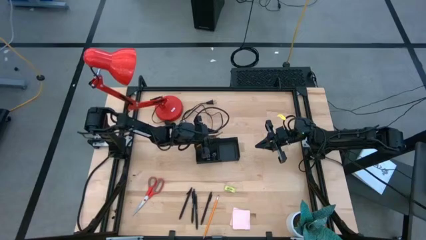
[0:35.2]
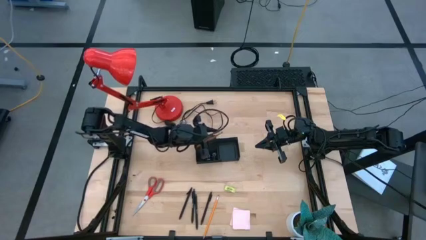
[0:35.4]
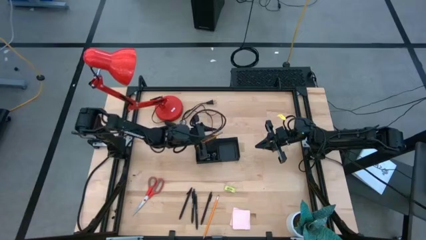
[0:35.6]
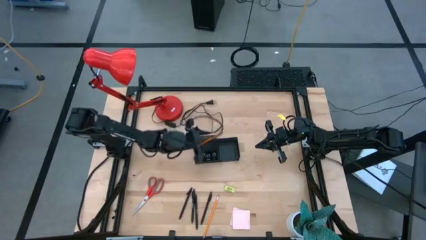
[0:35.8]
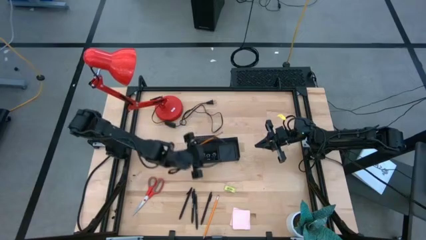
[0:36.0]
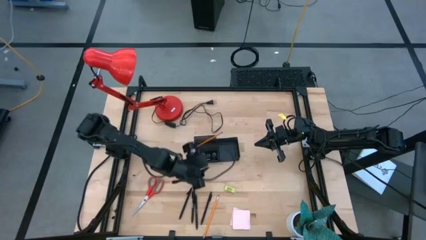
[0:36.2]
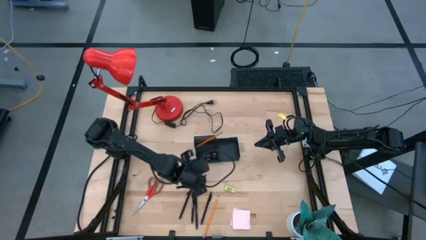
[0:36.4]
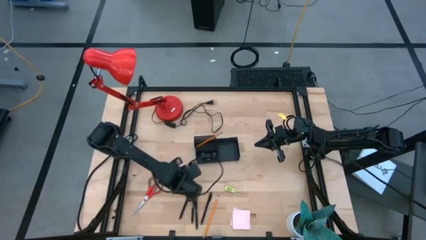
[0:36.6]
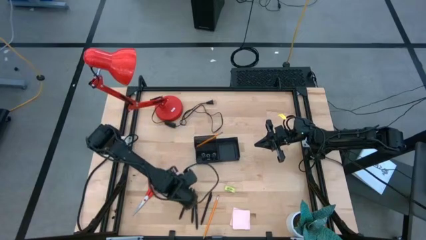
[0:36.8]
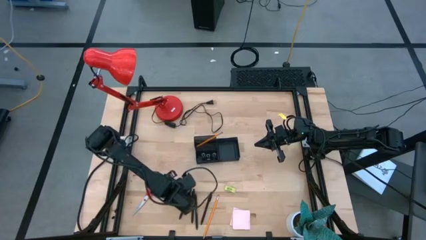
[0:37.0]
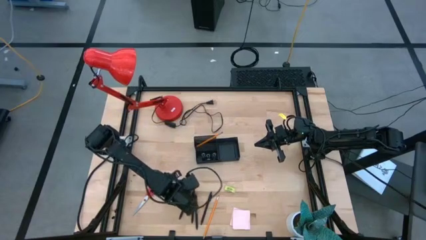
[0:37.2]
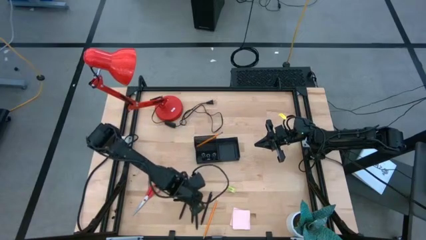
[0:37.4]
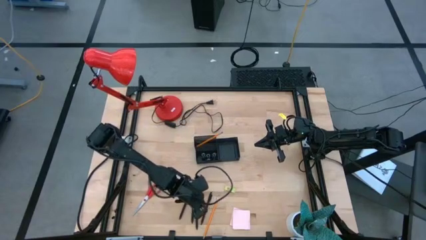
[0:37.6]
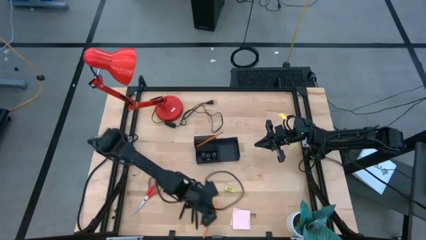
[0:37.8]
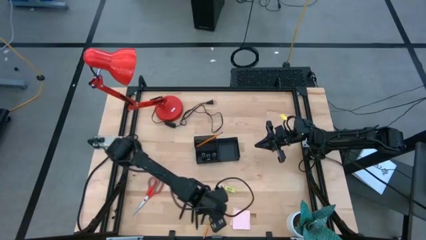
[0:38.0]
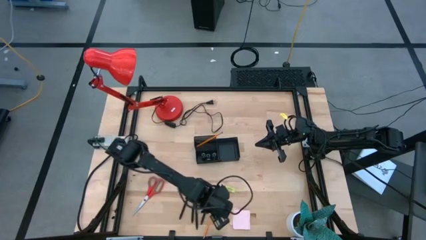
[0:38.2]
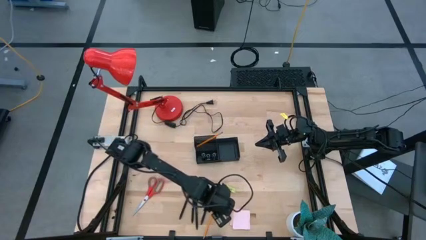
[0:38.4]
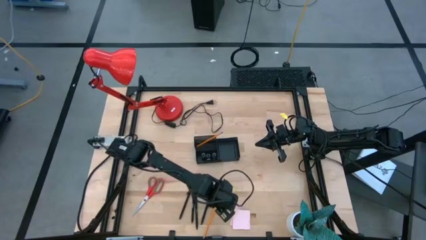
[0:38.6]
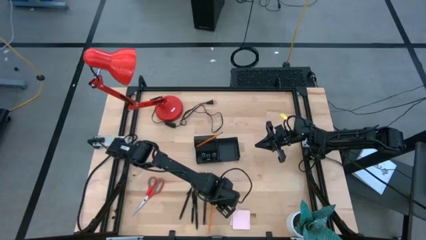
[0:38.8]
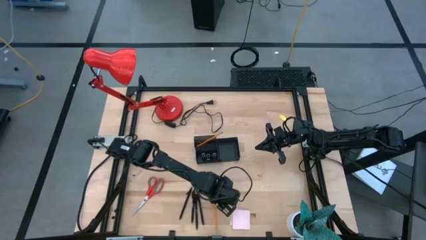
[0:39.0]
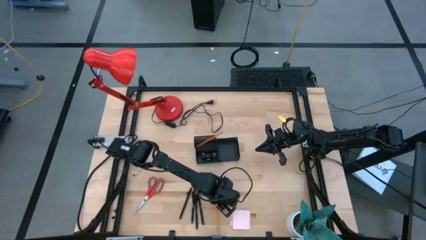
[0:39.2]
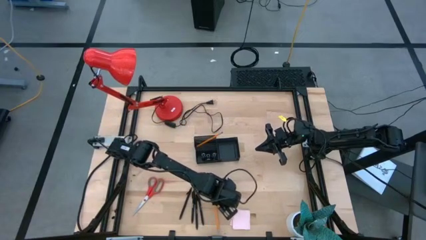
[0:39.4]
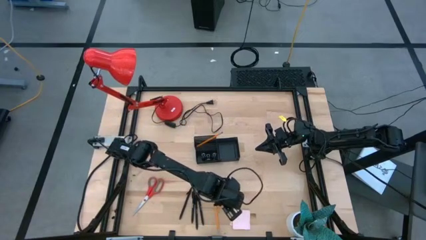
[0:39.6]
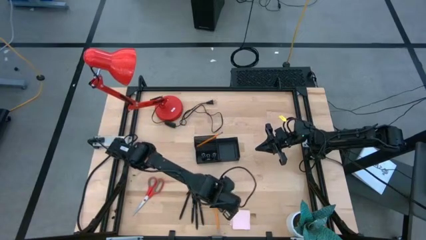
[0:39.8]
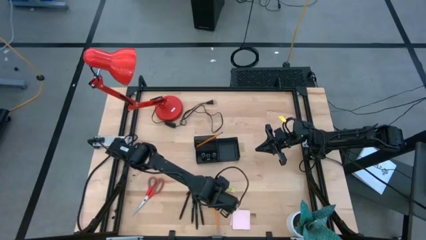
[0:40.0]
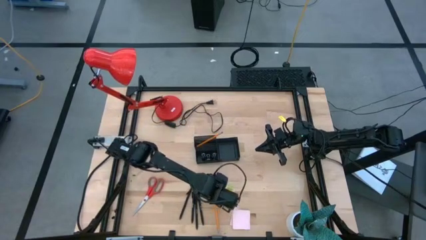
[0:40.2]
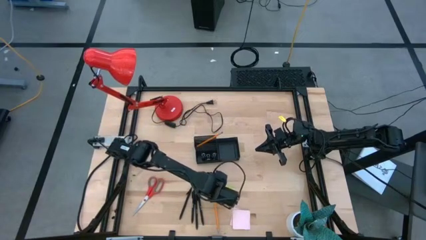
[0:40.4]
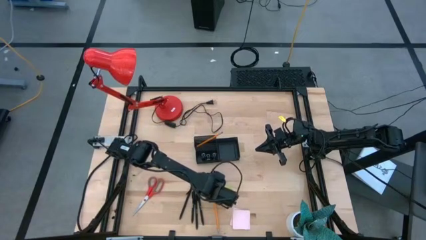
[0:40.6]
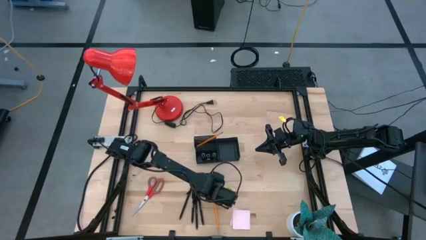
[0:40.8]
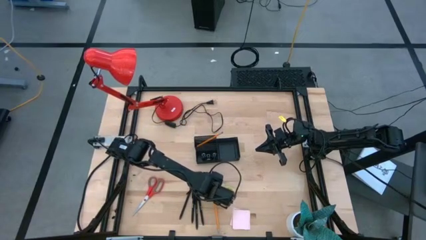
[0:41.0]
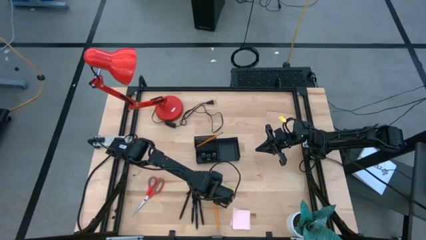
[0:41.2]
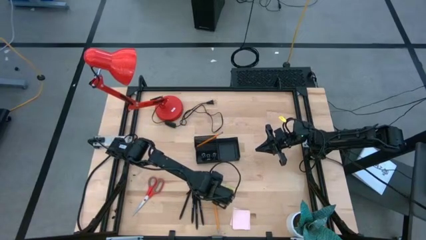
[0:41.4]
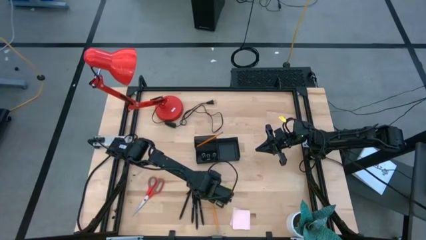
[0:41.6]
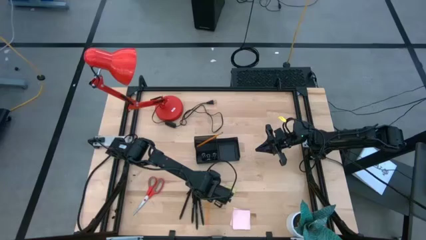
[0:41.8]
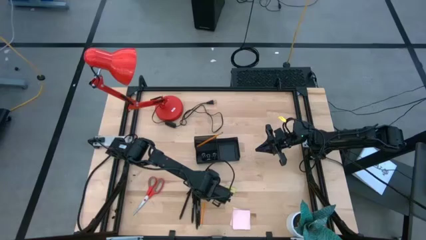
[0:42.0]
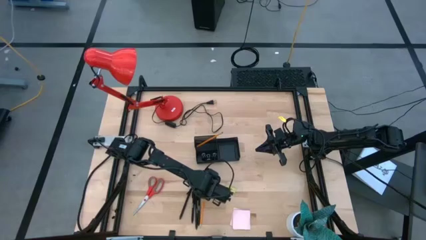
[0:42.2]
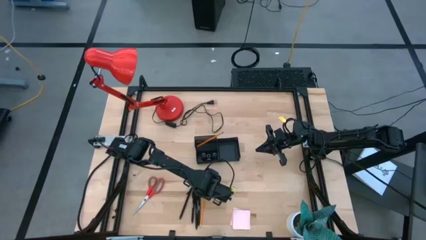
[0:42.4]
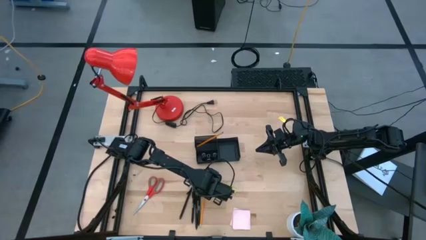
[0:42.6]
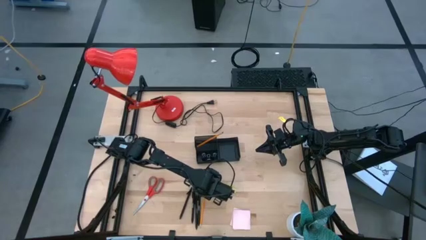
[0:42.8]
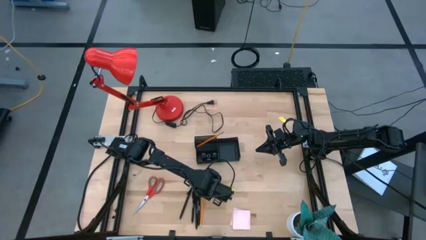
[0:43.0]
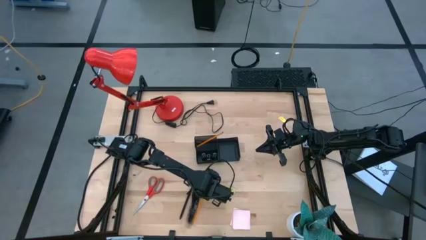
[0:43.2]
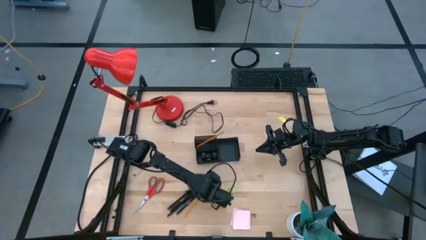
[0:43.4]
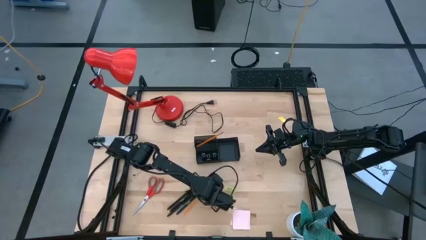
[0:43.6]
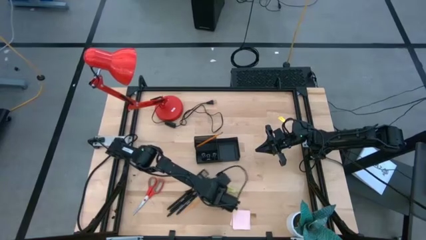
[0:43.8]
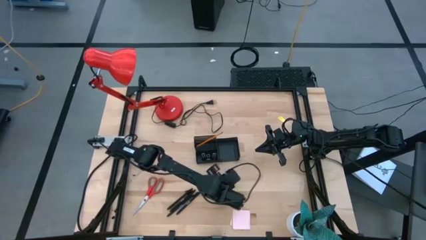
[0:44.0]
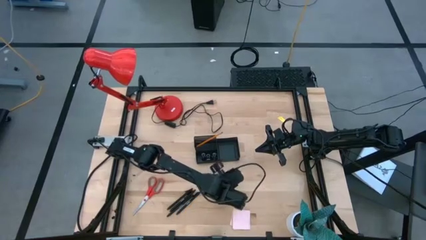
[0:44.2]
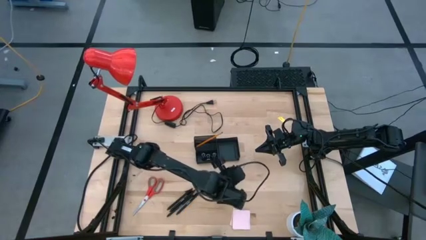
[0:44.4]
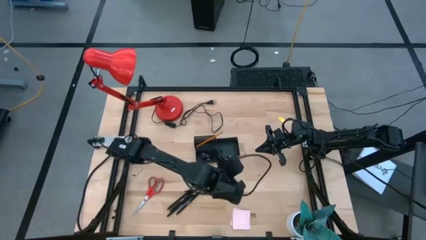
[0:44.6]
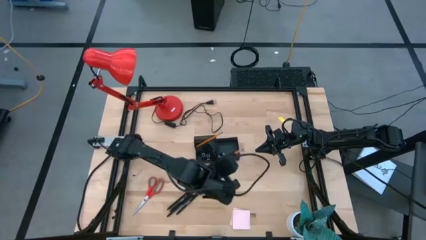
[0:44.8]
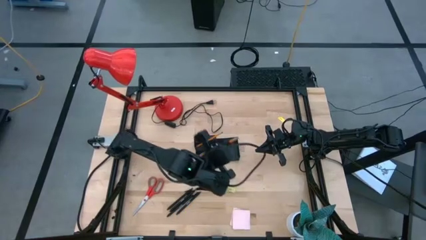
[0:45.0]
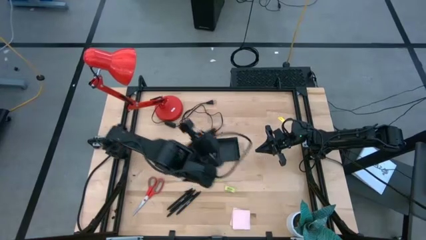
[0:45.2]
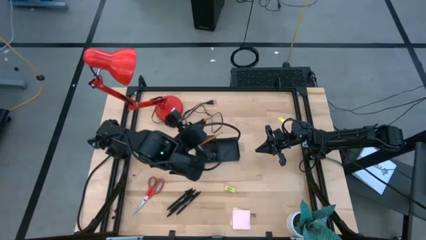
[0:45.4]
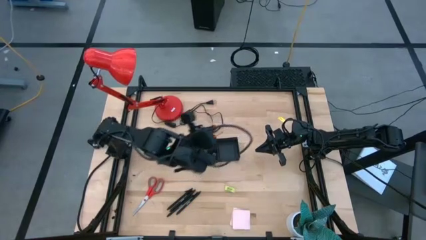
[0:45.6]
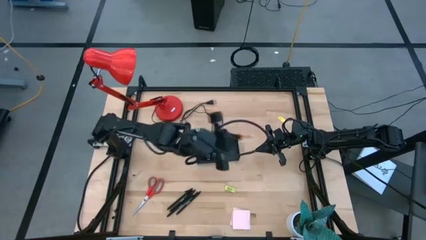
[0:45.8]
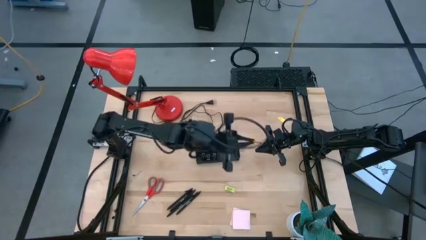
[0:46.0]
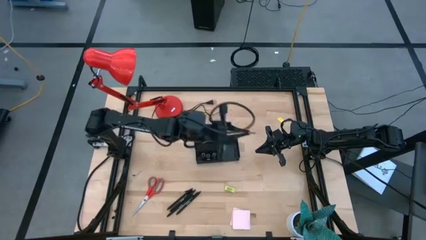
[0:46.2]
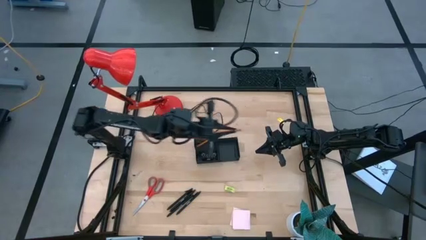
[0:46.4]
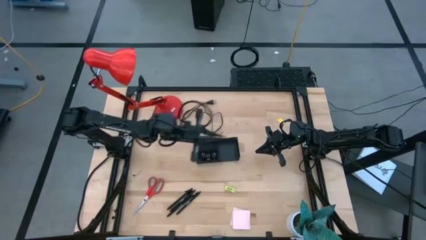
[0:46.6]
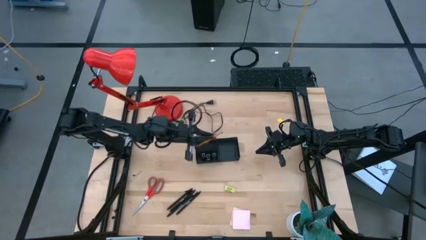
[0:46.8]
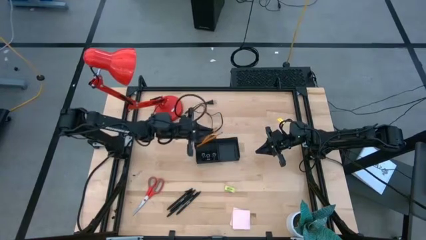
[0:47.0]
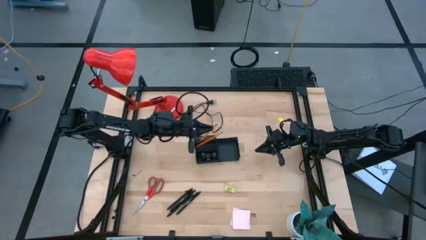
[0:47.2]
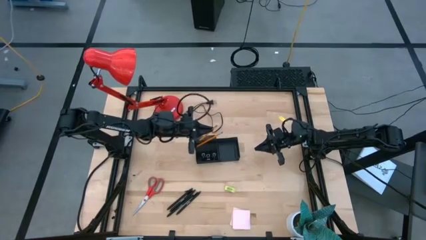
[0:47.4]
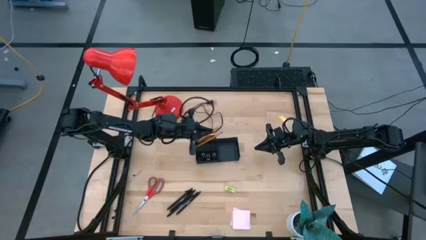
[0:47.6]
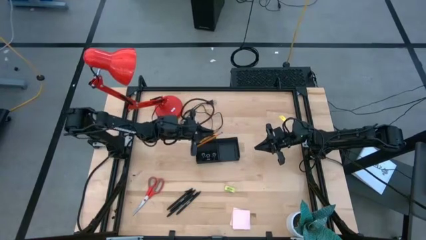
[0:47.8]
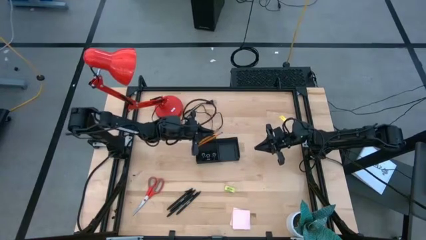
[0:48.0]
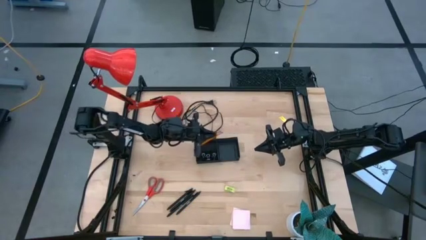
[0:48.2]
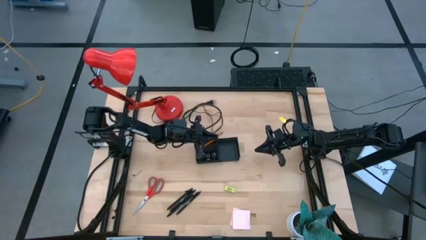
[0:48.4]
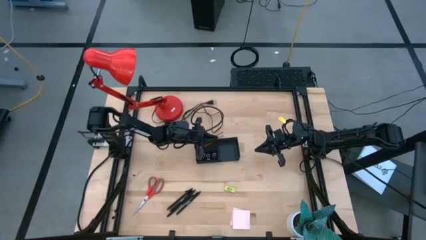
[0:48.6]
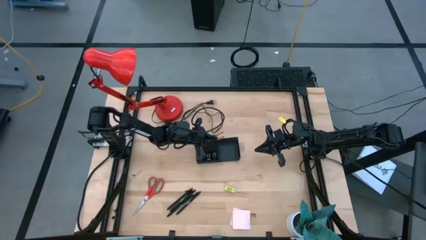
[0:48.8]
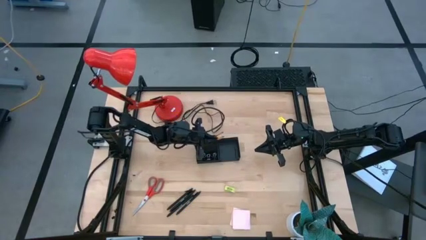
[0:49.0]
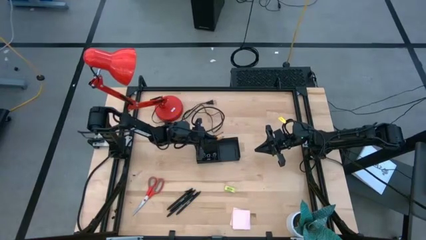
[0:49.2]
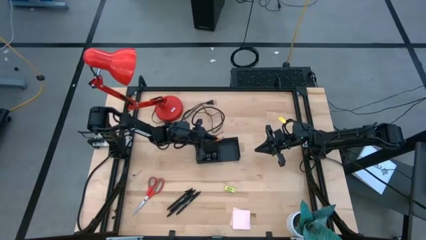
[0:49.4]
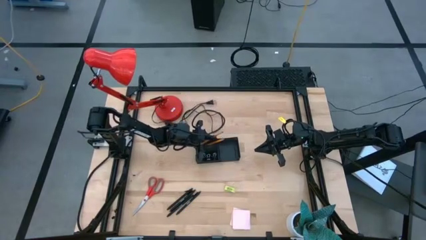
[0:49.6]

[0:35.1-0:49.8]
Task: Pick and place office supplies into organizer
Put the orange pencil into the desk organizer
